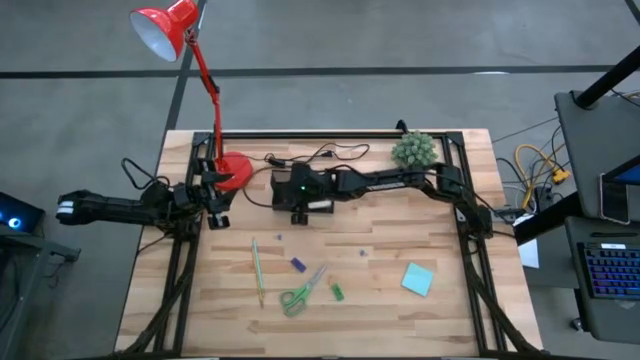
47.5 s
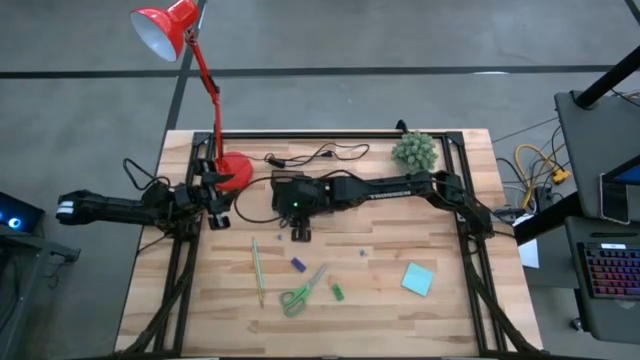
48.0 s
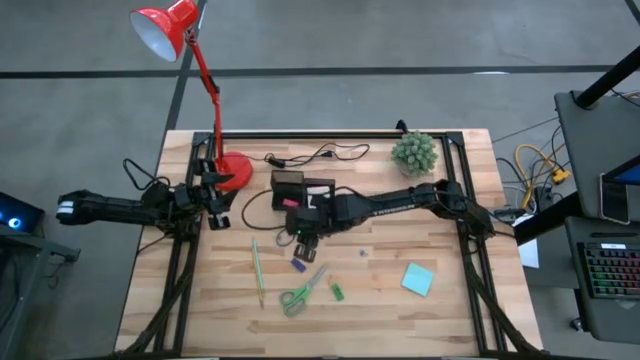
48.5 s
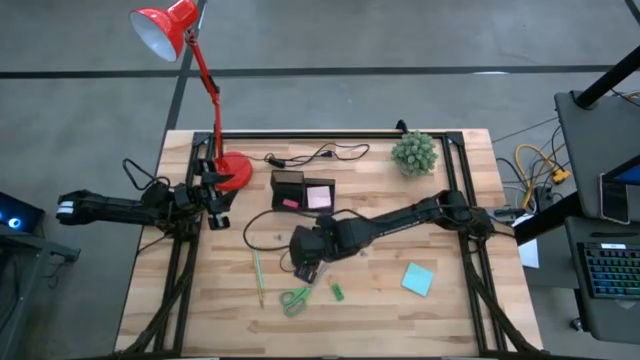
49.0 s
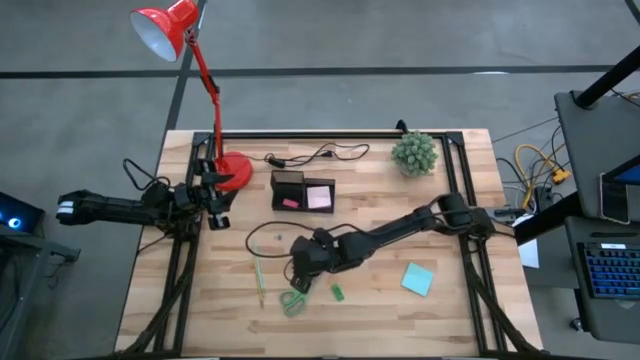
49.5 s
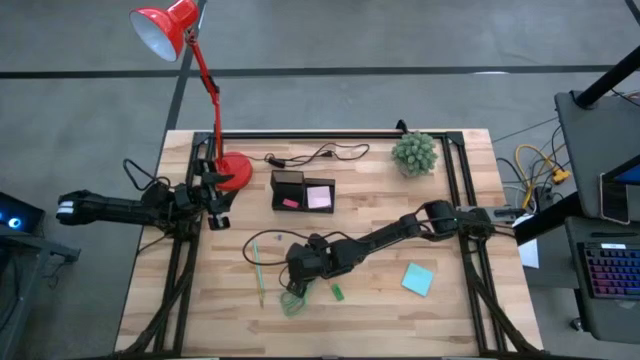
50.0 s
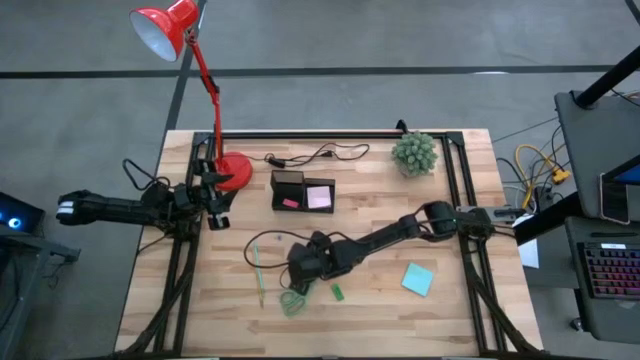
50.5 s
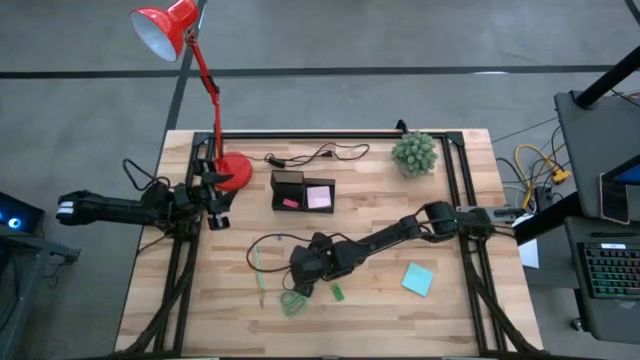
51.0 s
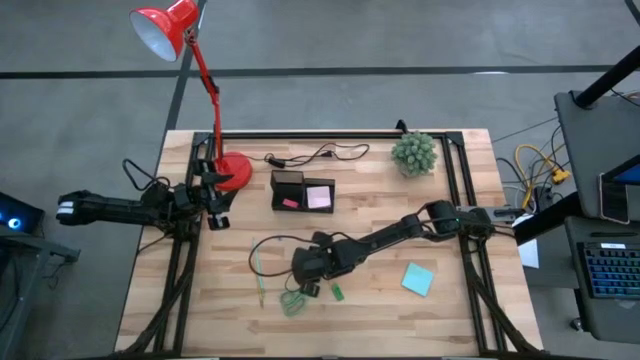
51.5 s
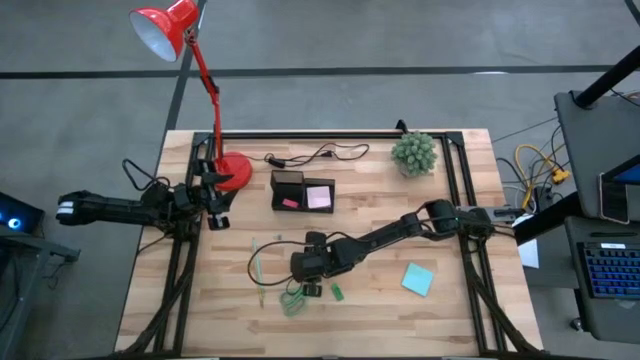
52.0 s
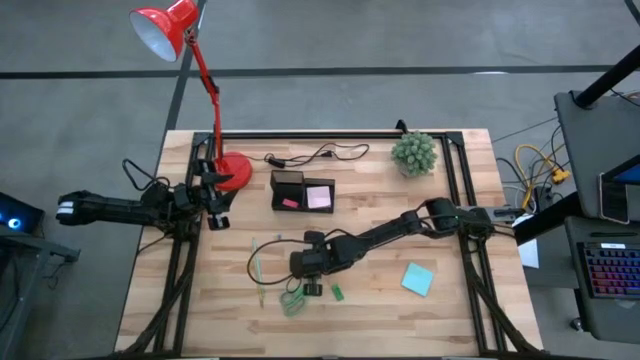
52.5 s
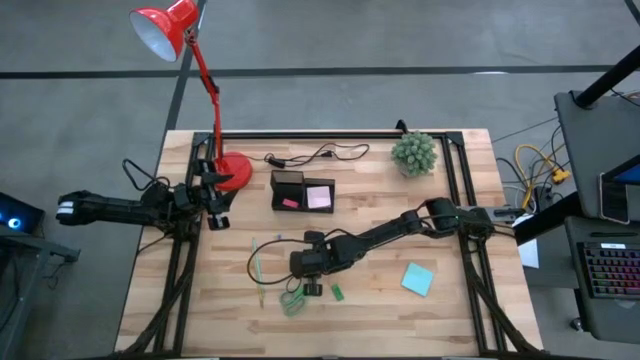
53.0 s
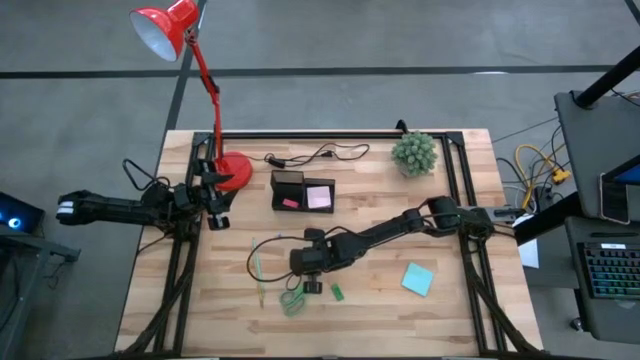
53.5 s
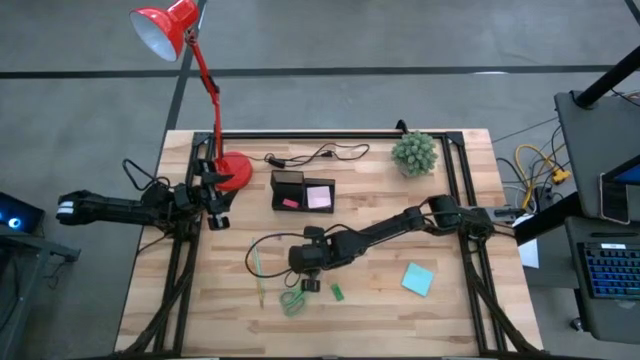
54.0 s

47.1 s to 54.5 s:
Task: Pick and place office supplies into organizer
Put the blue eraser into the black mesh desk organizer

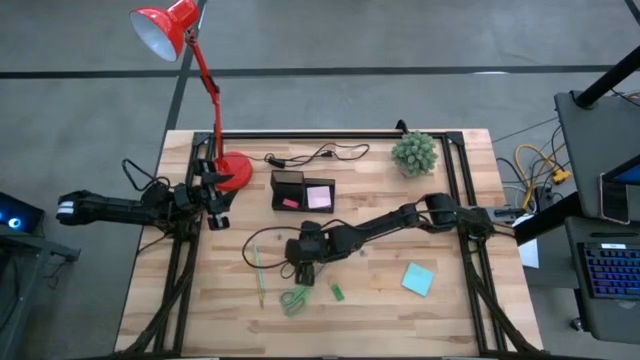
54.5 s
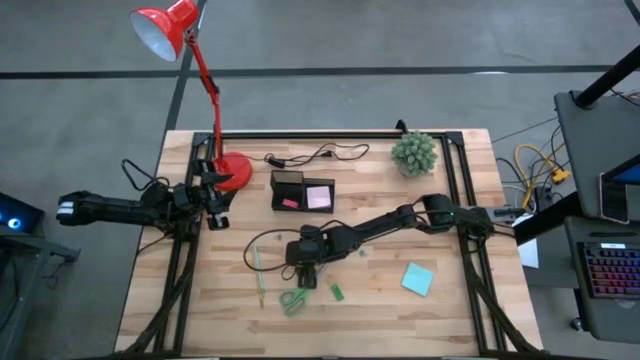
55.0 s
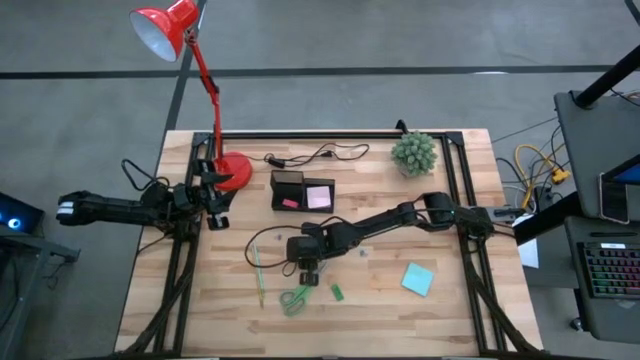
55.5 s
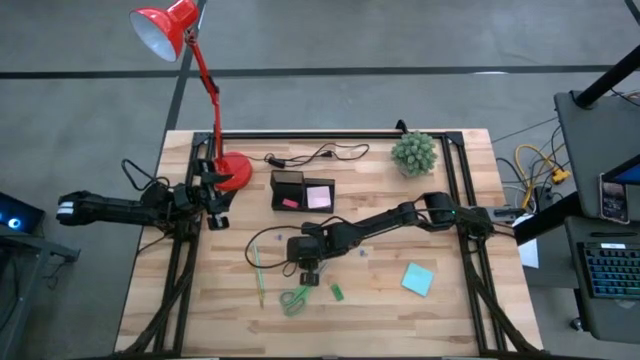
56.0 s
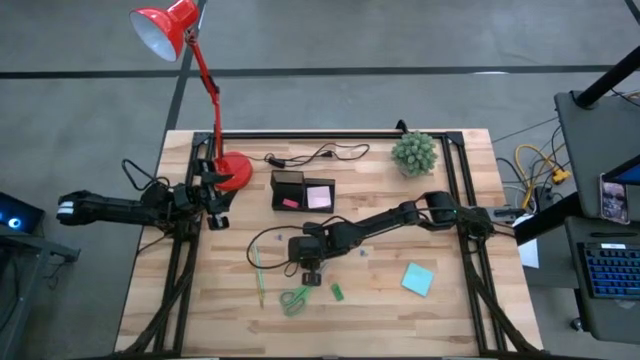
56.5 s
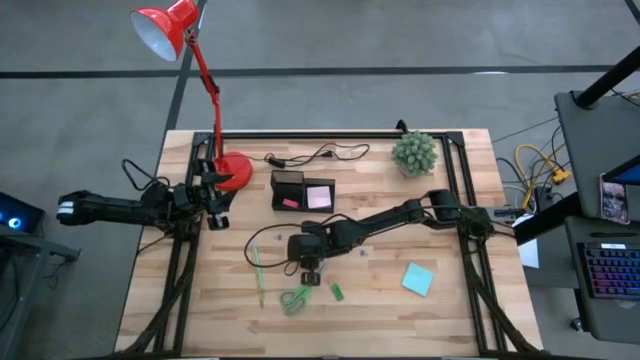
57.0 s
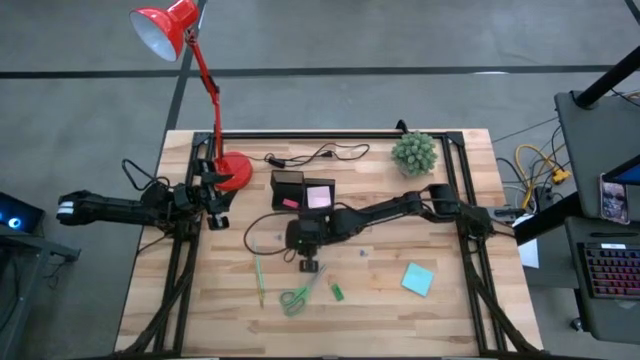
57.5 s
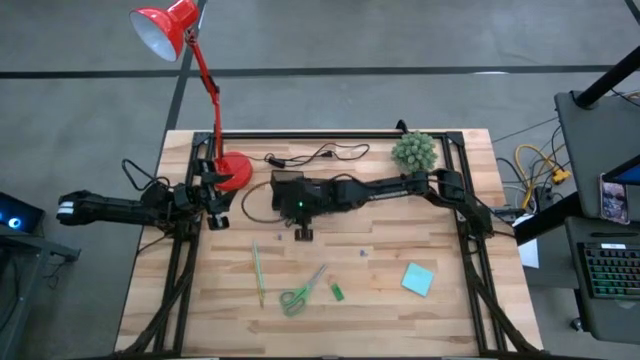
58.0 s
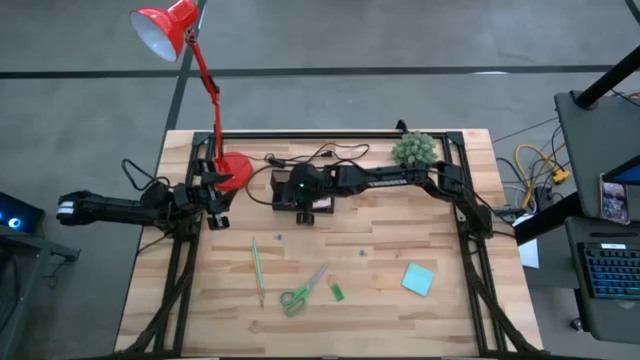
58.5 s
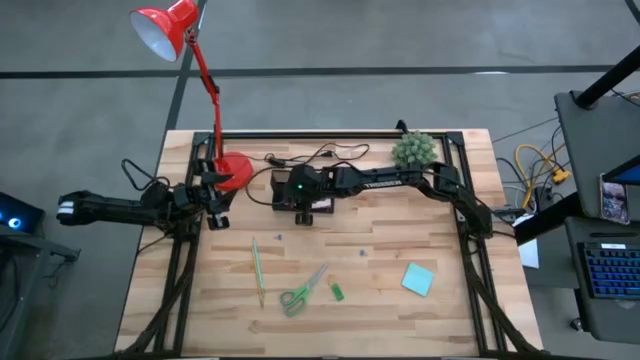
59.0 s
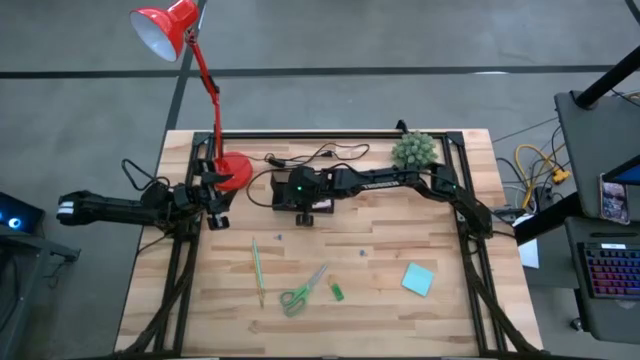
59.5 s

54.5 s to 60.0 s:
Put the blue eraser into the black mesh desk organizer

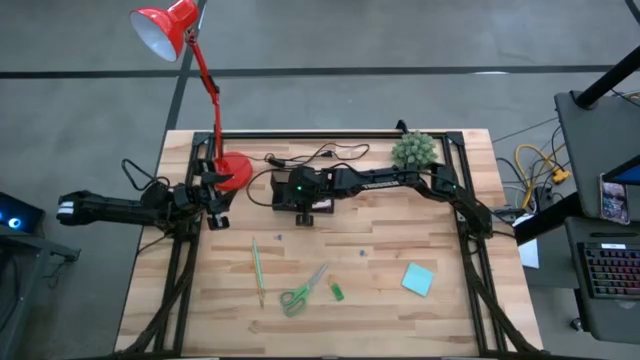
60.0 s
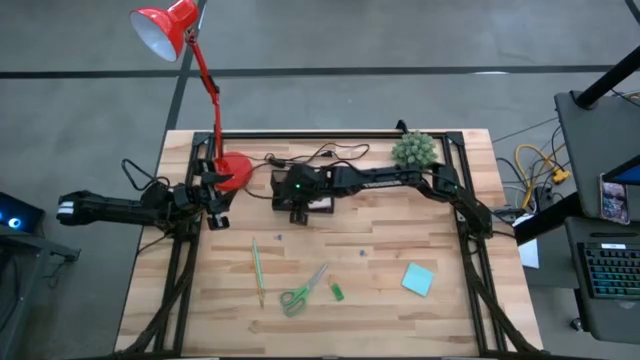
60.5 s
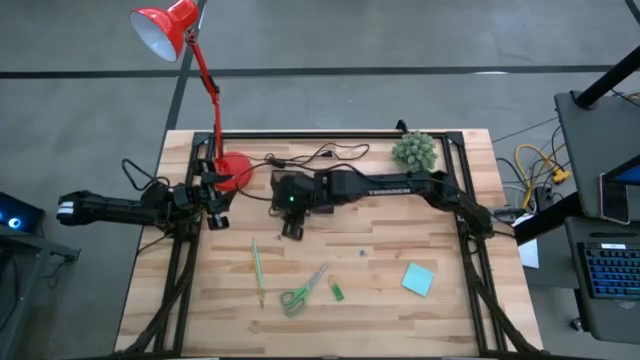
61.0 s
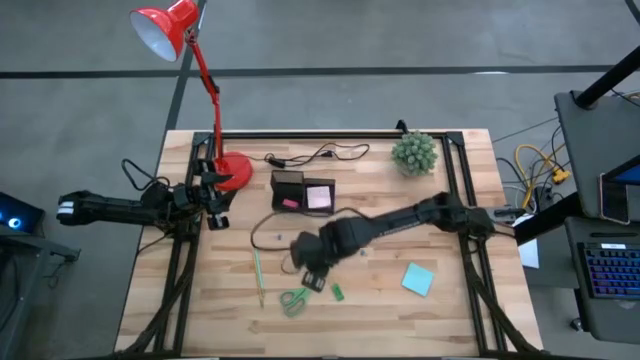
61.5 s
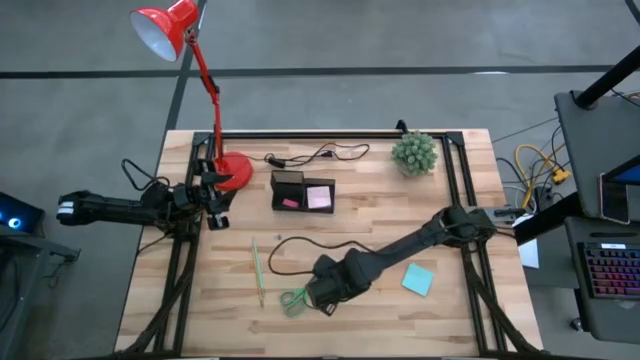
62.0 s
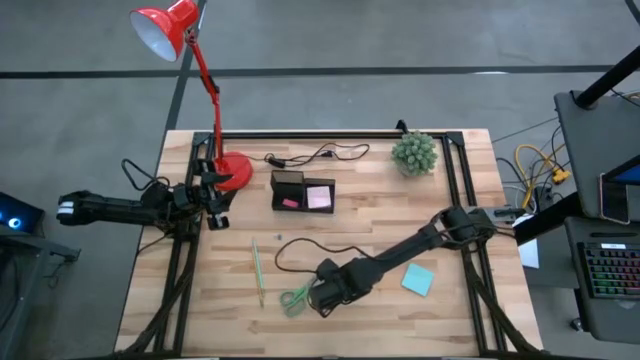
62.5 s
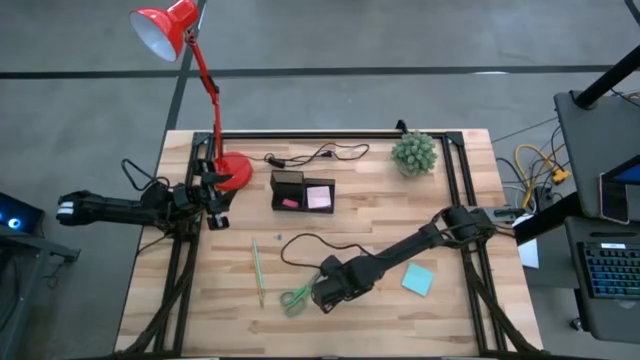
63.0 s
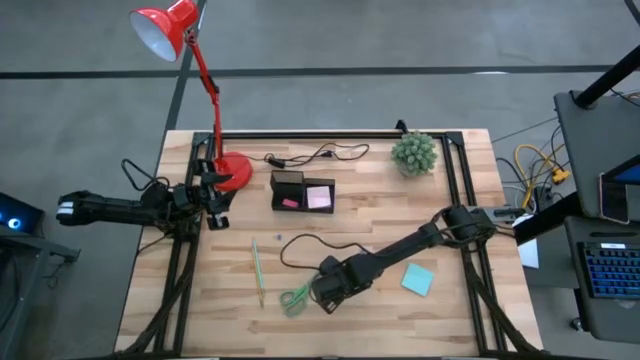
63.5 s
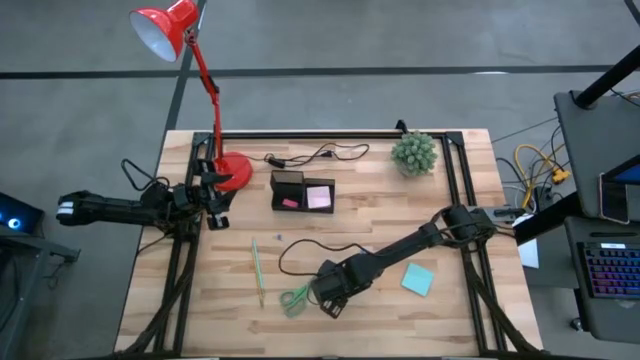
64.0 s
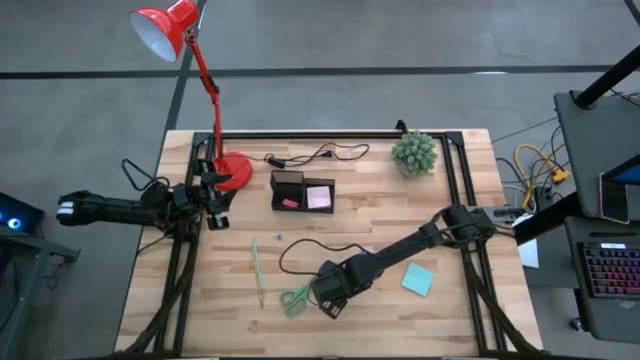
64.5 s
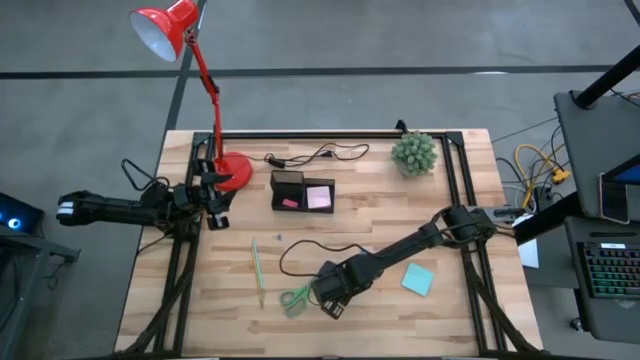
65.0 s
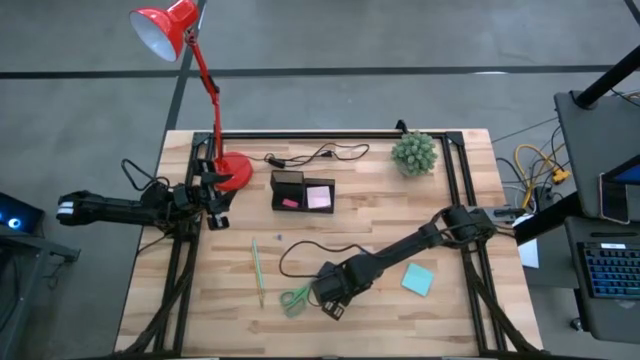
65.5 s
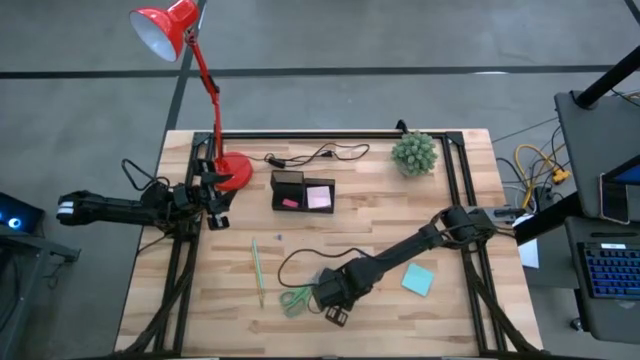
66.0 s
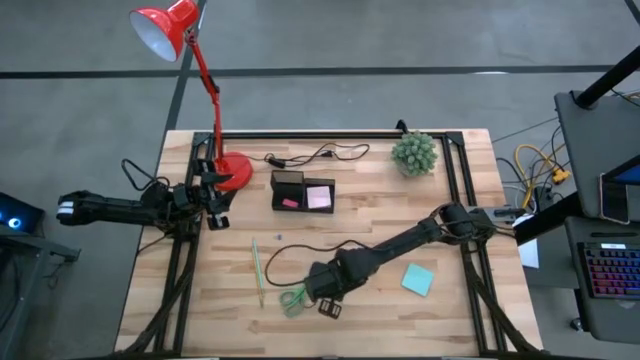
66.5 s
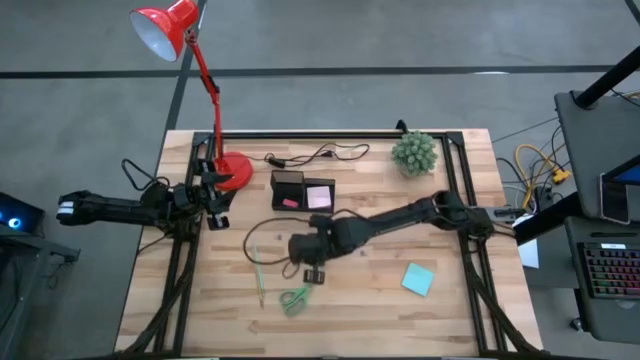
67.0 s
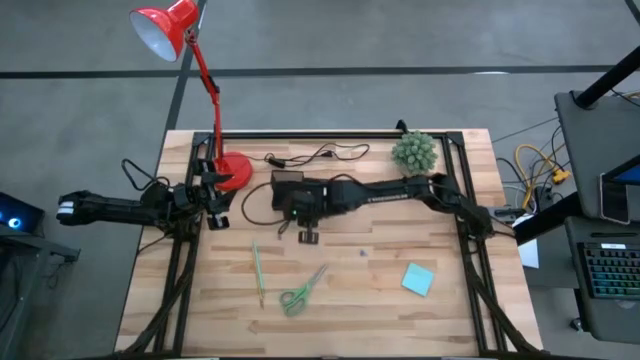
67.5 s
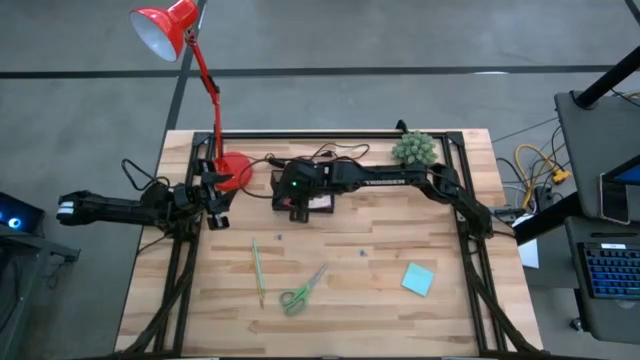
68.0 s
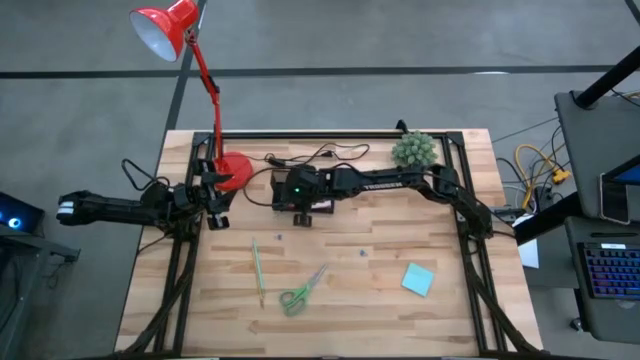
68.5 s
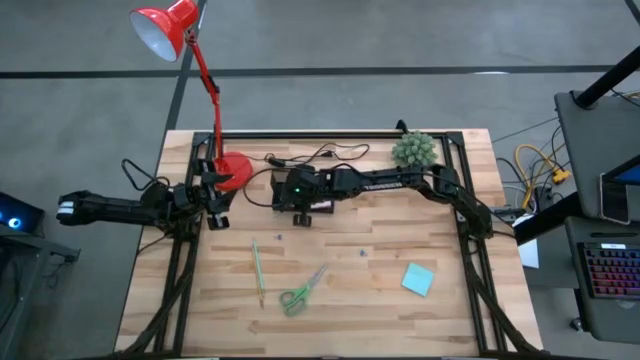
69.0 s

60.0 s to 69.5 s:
Put the green eraser into the black mesh desk organizer
